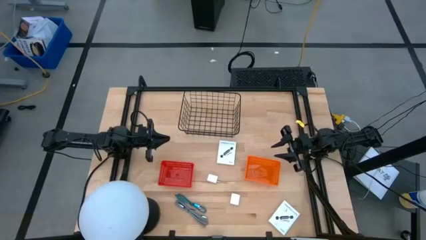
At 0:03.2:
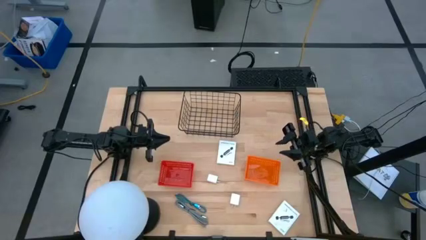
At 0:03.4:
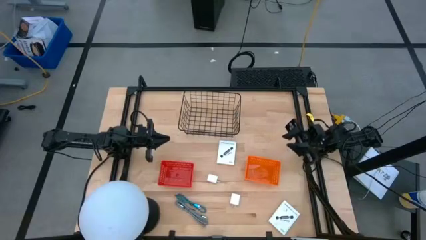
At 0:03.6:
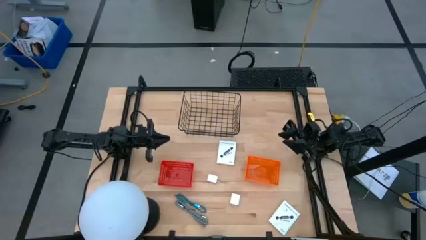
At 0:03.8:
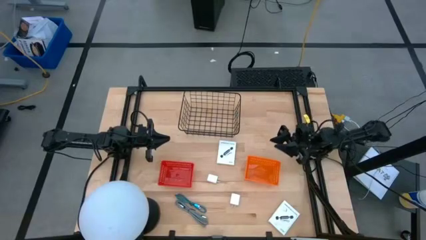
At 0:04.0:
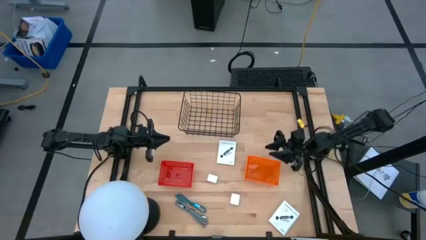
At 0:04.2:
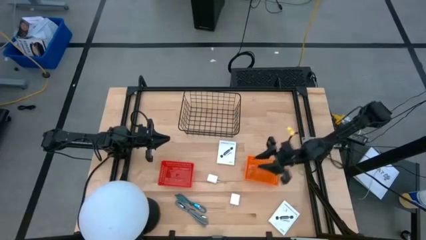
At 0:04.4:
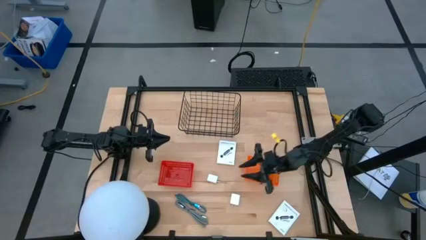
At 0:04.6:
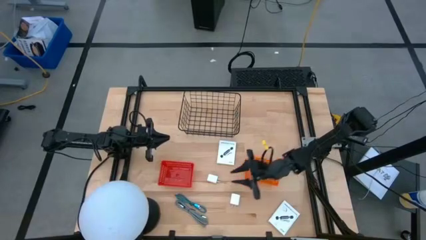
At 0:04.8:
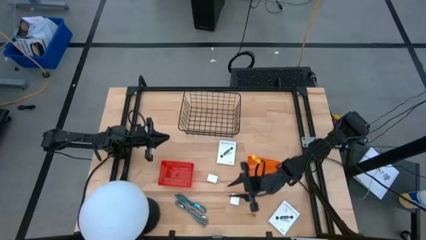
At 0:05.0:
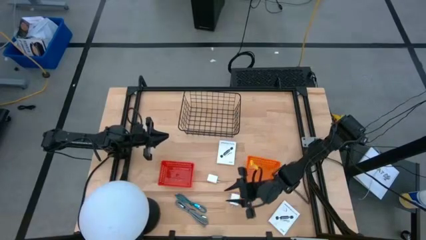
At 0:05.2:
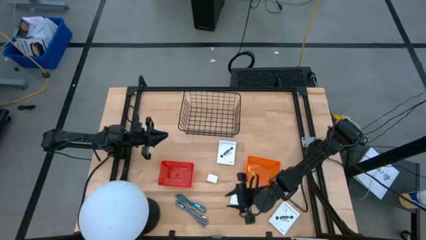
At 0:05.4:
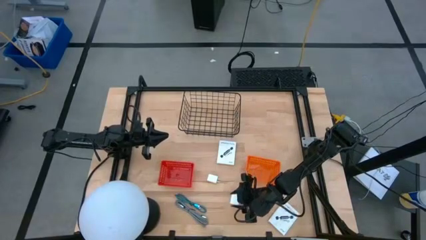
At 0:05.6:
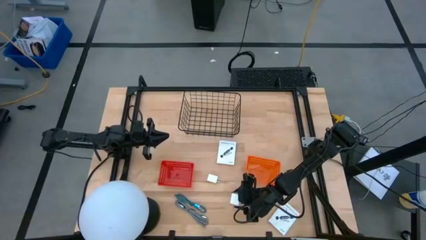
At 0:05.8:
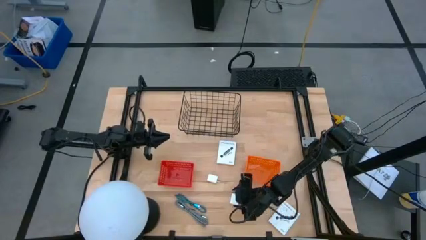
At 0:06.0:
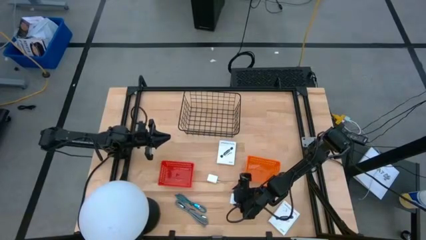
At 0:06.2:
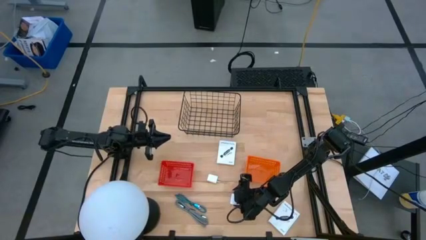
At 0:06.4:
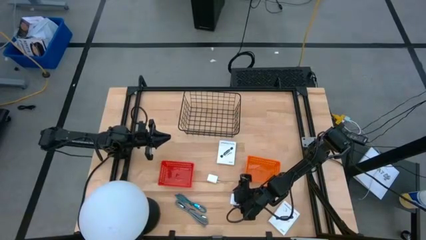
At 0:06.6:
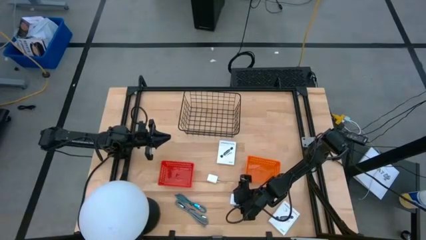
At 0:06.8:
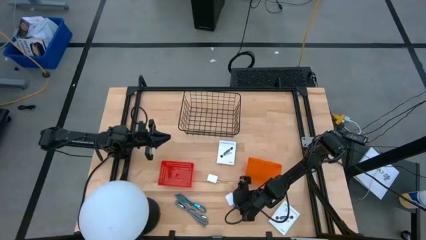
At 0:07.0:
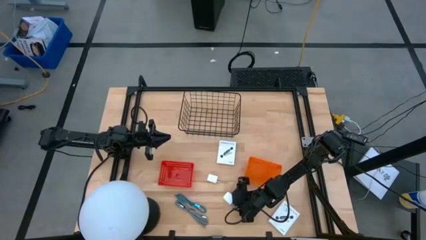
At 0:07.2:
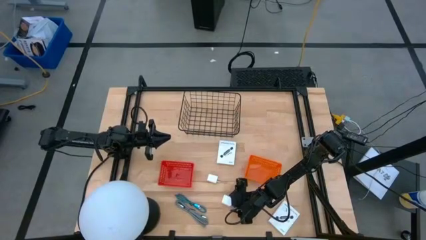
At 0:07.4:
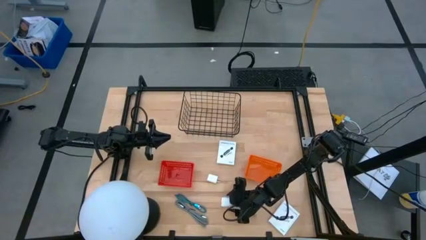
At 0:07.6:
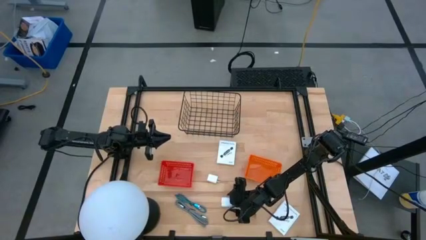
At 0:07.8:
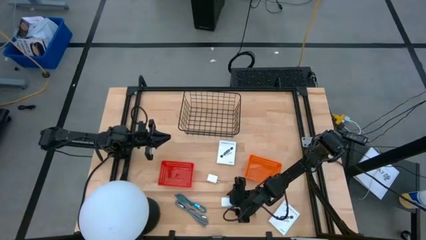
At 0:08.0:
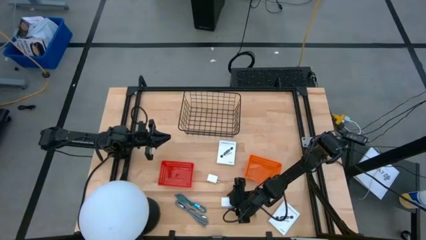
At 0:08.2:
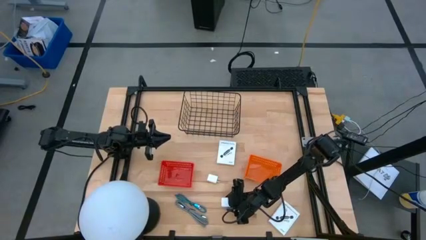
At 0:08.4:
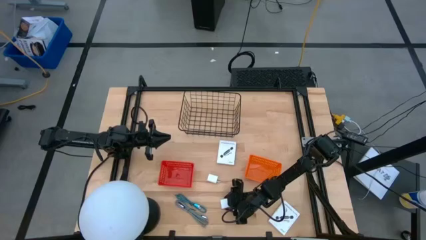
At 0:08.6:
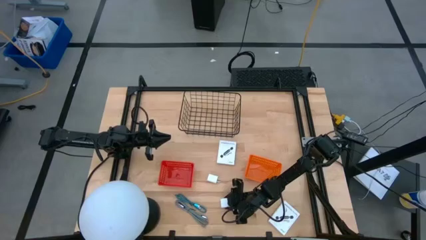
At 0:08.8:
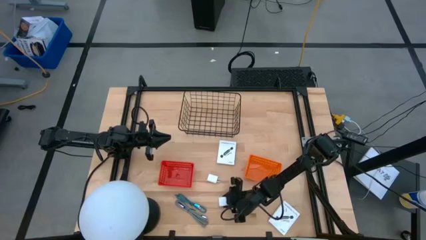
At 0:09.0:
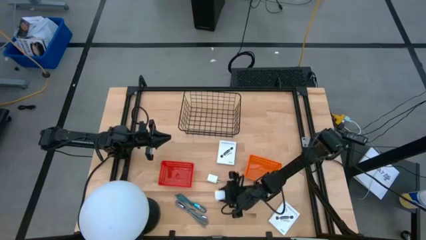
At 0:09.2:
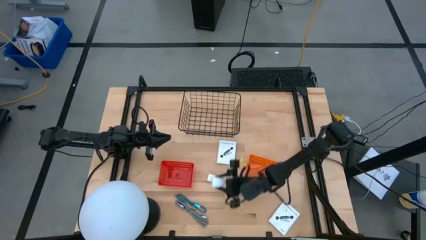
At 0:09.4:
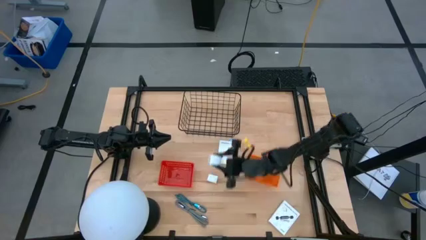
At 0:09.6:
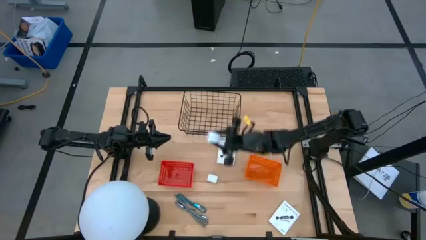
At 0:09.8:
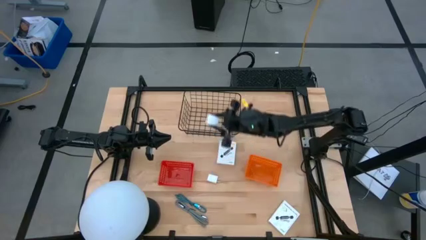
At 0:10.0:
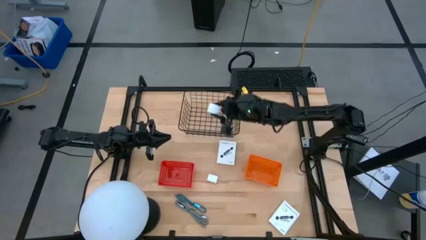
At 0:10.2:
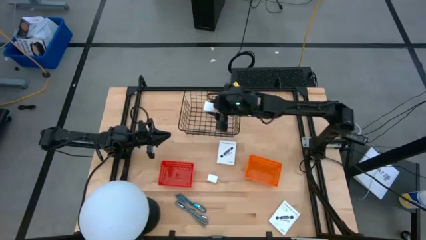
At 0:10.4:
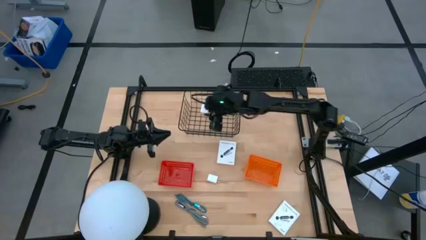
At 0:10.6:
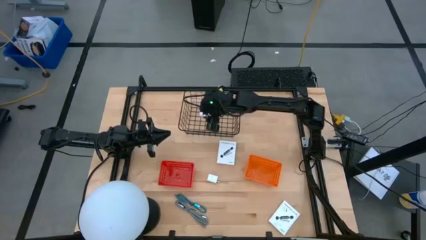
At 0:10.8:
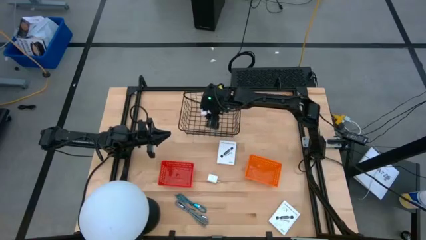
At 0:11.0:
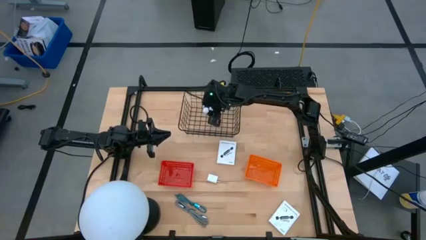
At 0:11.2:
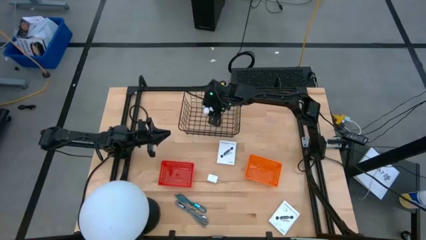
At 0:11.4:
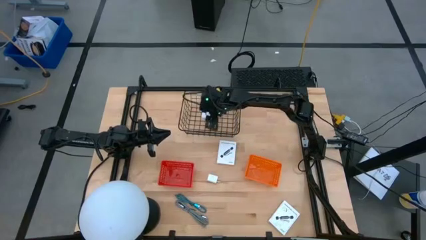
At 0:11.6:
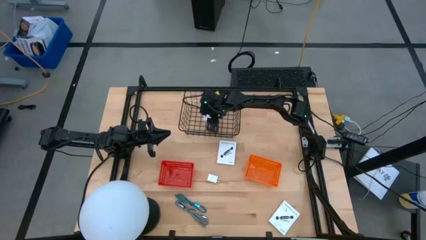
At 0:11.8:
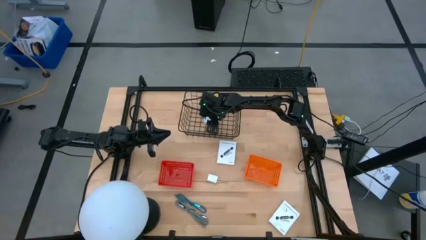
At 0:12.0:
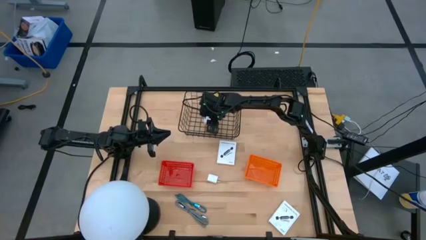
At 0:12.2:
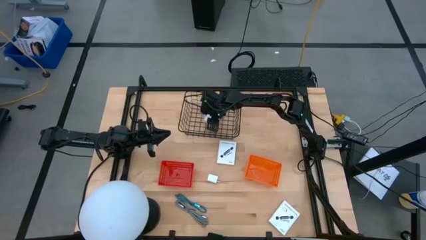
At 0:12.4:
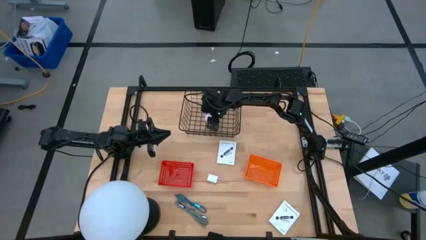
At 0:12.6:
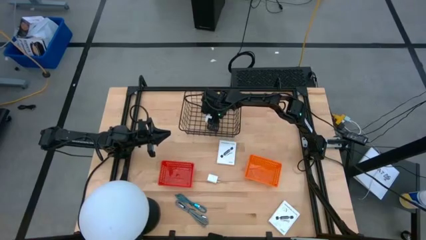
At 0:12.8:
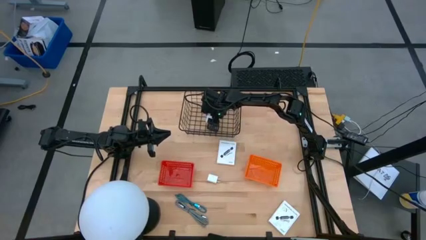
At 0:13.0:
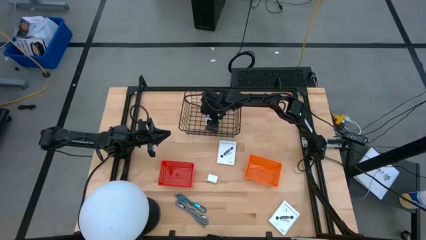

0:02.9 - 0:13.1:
Task: Pick and place items into bin
Put the bottom white charger adapter into wire basket

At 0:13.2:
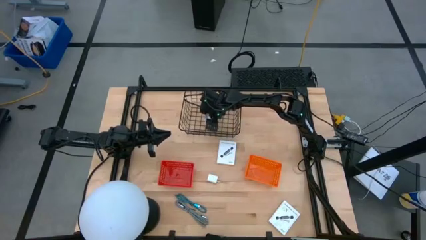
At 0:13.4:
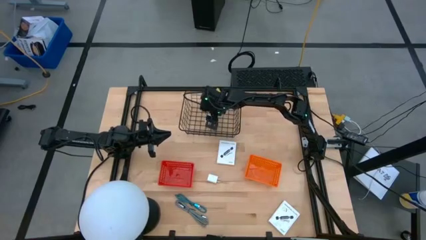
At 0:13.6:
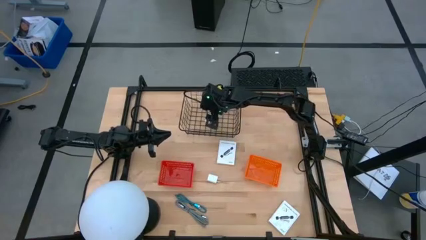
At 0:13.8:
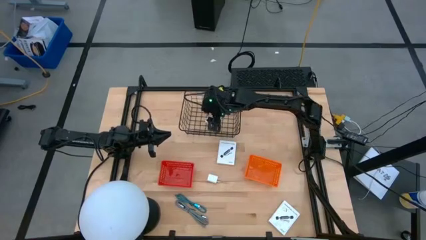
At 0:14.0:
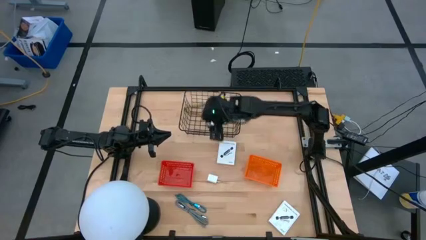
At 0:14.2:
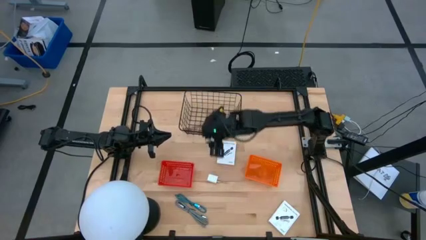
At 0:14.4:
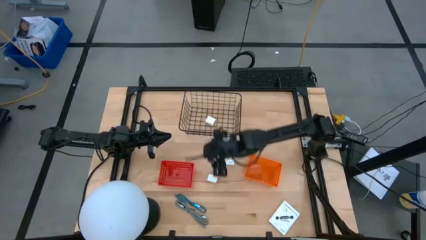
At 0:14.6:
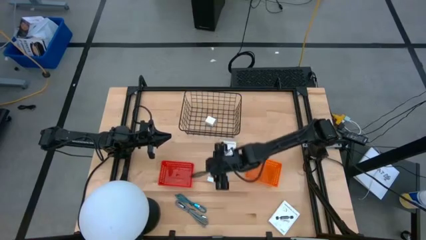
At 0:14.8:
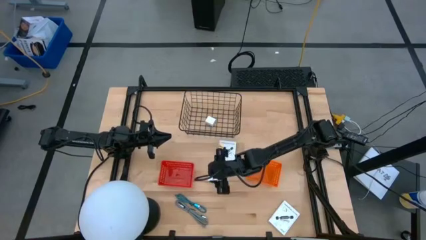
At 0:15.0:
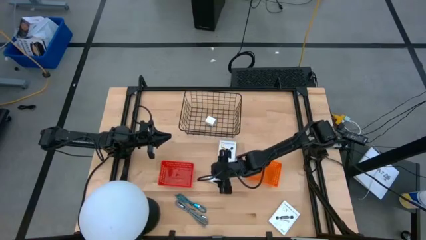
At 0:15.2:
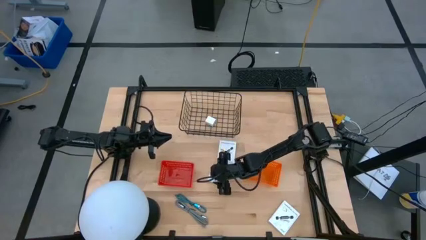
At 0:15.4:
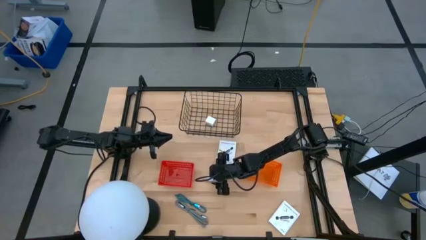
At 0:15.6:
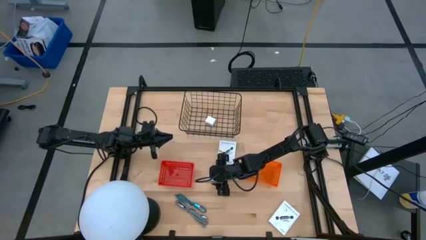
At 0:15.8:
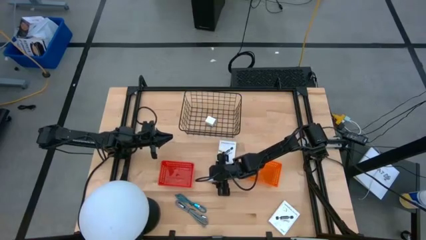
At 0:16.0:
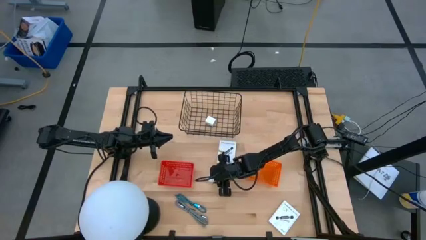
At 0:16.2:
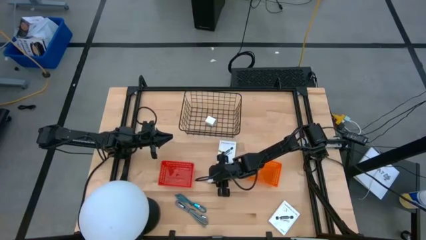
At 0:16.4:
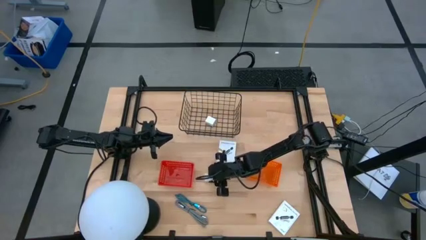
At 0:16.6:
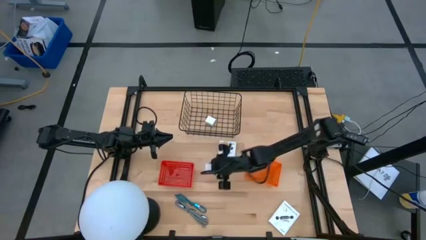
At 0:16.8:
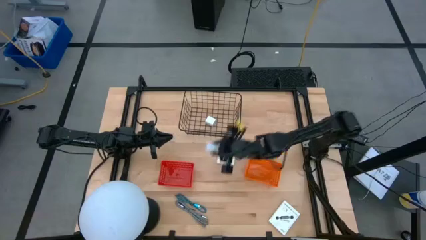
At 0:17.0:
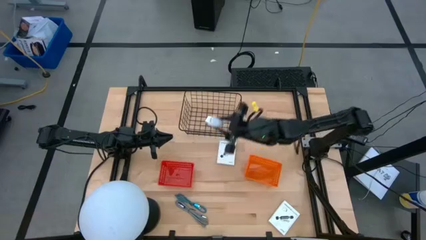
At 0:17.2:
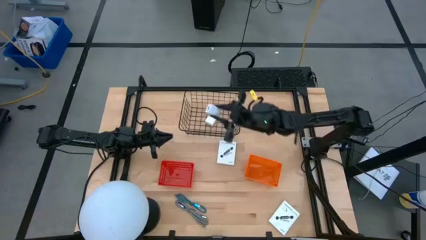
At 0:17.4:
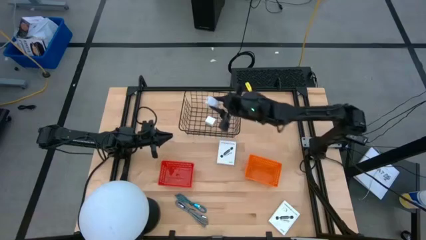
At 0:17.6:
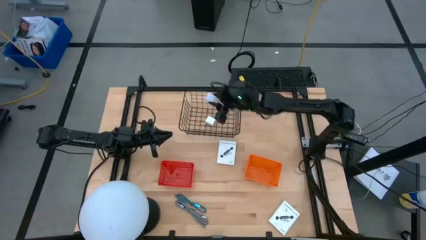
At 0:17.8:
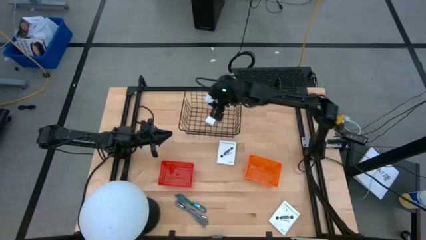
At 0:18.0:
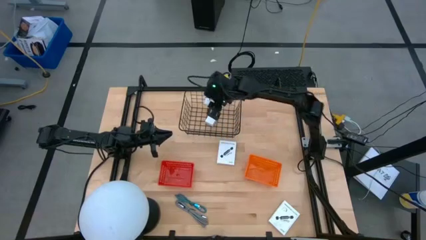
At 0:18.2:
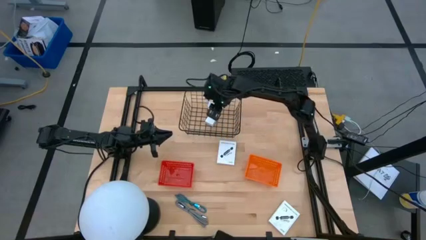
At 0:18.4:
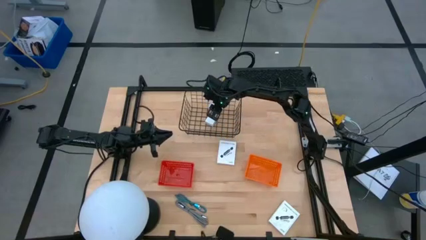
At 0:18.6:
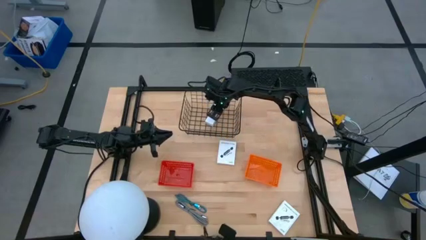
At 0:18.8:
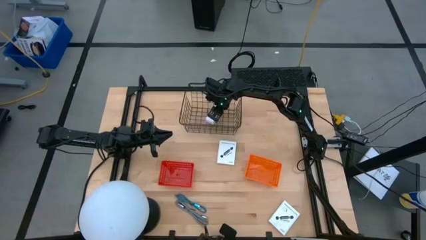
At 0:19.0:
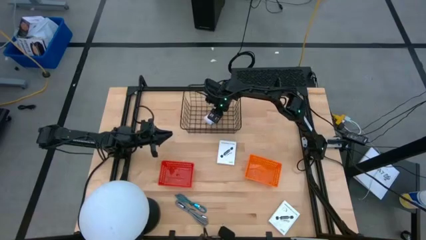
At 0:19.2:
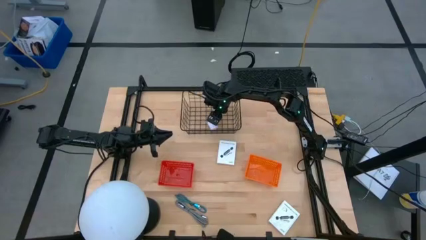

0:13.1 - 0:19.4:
Put the white charger adapter into wire basket
